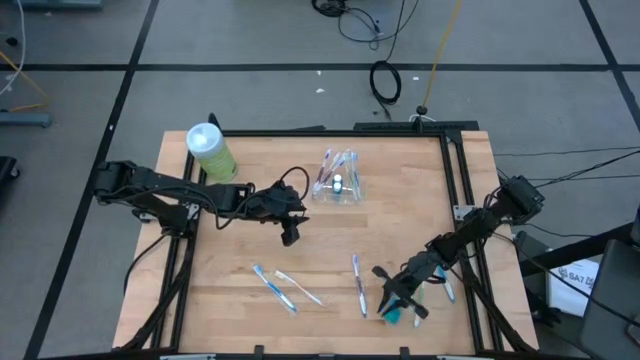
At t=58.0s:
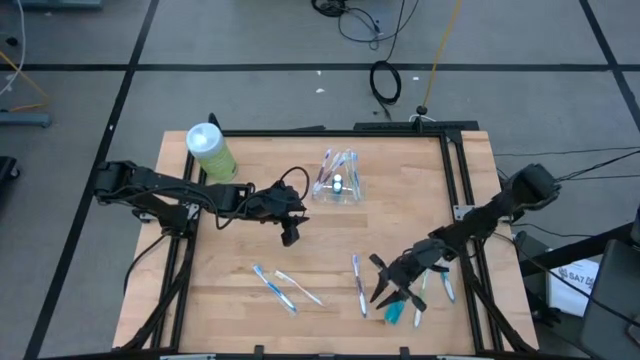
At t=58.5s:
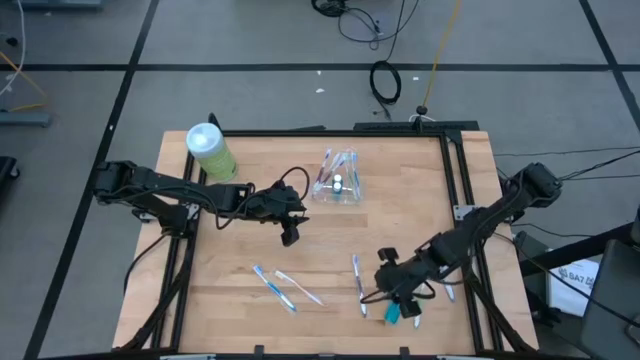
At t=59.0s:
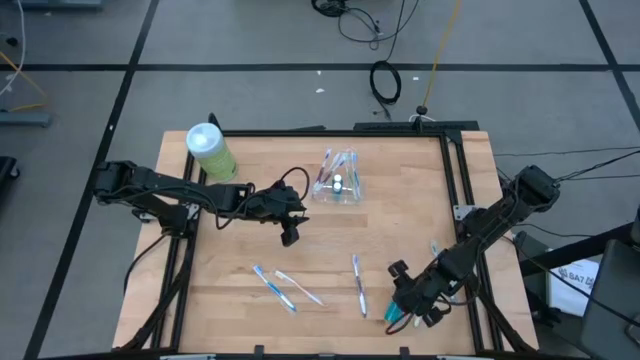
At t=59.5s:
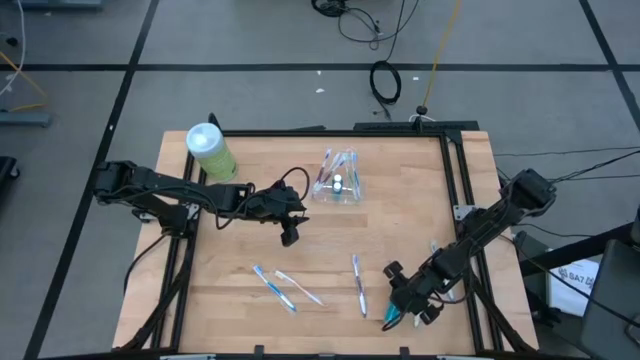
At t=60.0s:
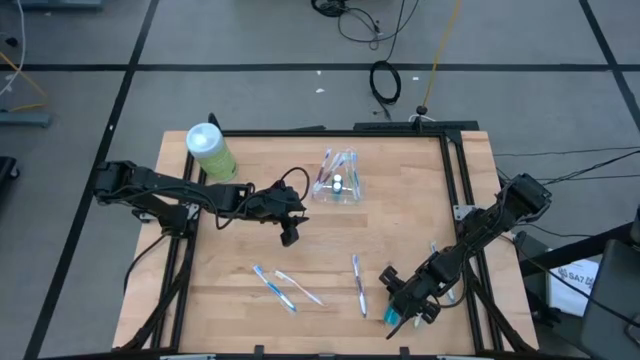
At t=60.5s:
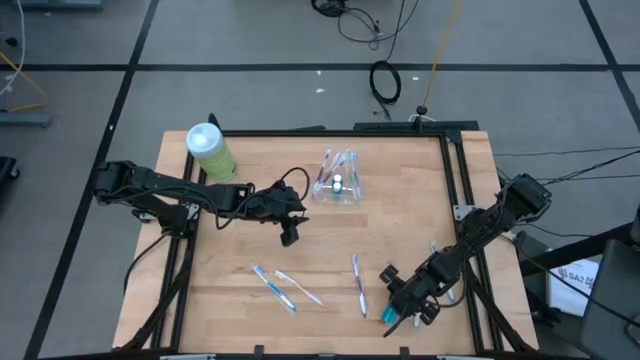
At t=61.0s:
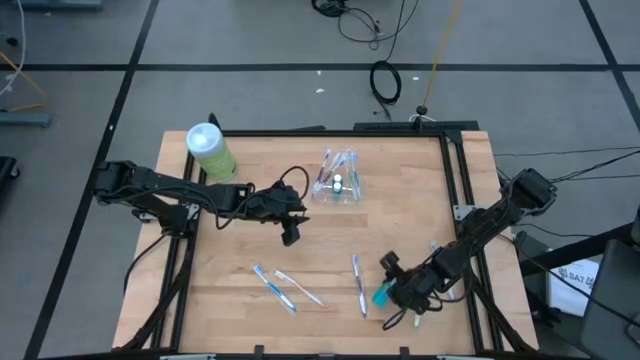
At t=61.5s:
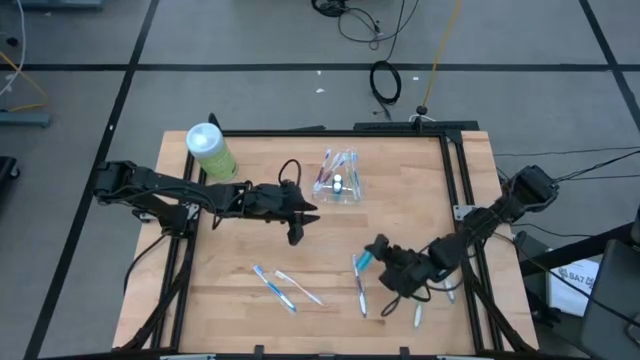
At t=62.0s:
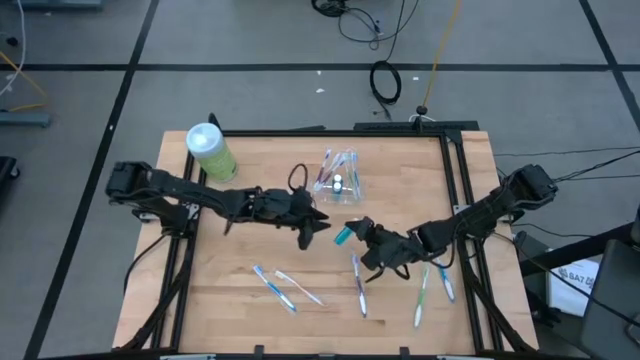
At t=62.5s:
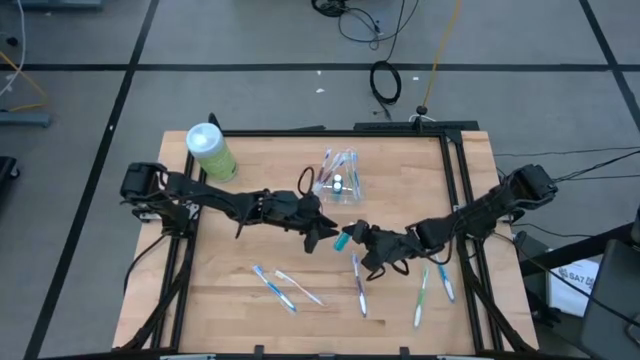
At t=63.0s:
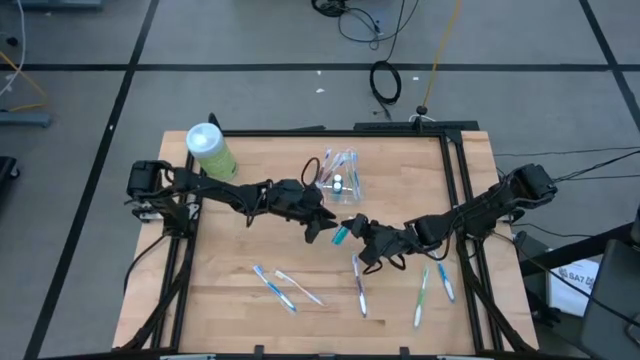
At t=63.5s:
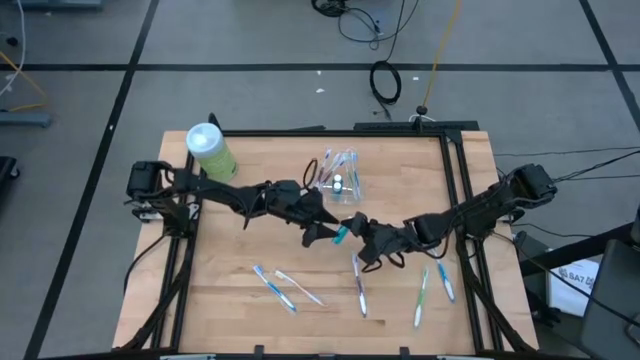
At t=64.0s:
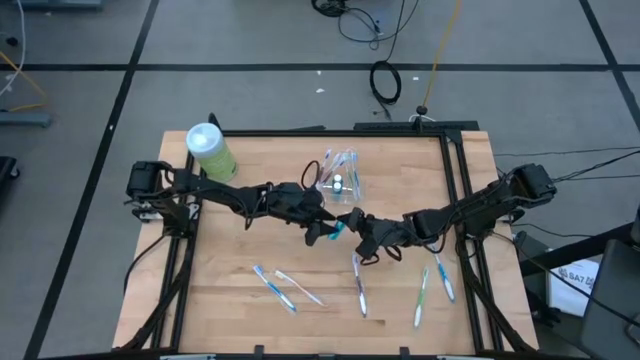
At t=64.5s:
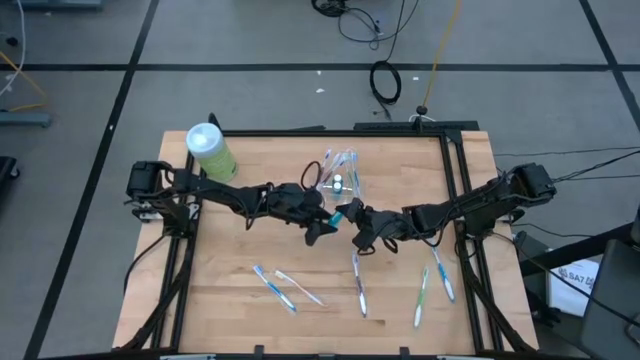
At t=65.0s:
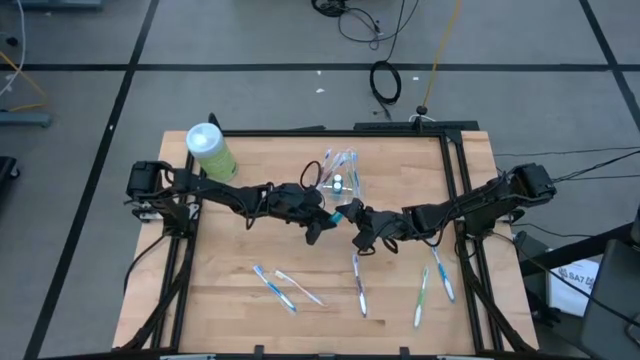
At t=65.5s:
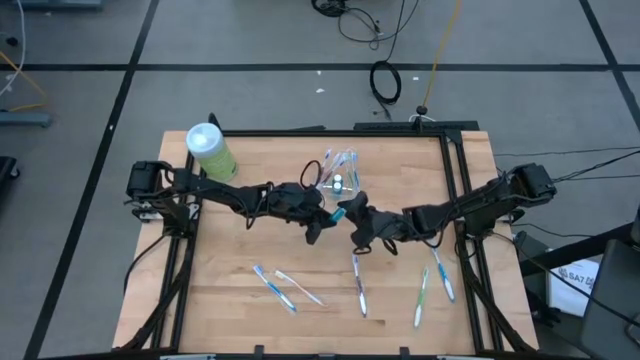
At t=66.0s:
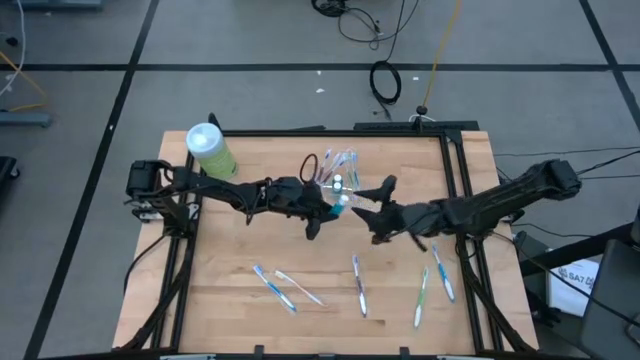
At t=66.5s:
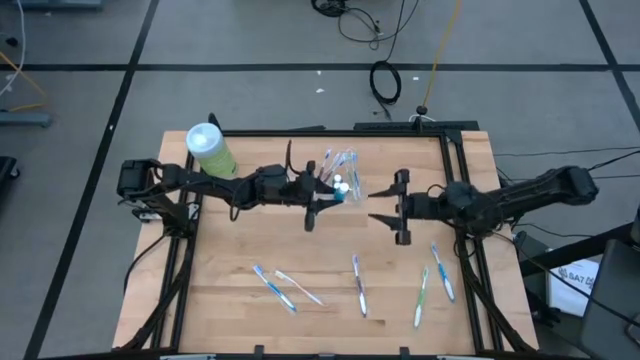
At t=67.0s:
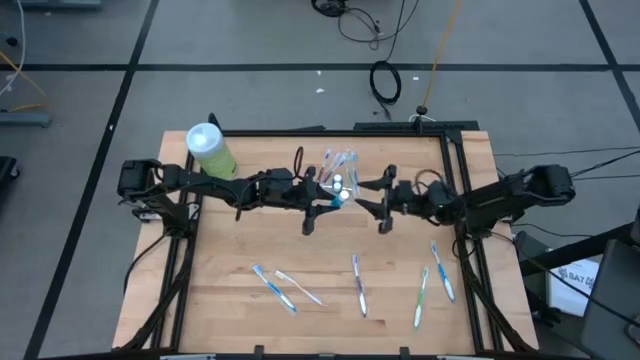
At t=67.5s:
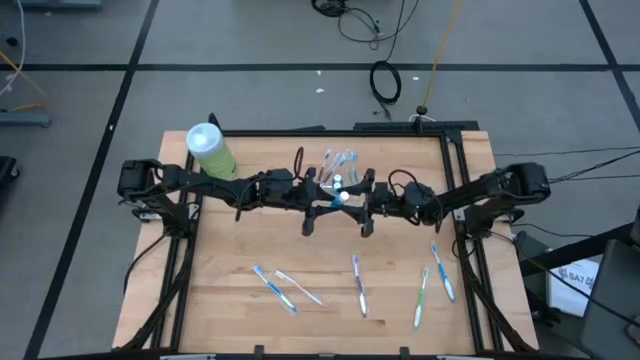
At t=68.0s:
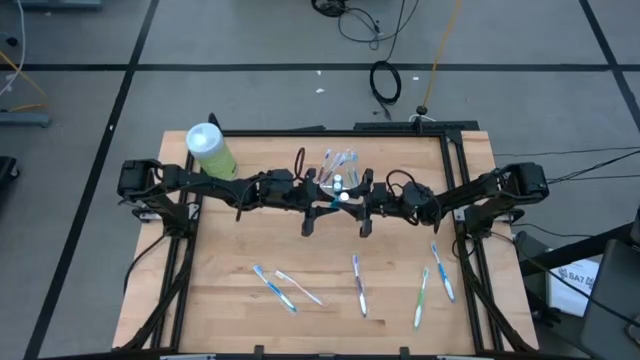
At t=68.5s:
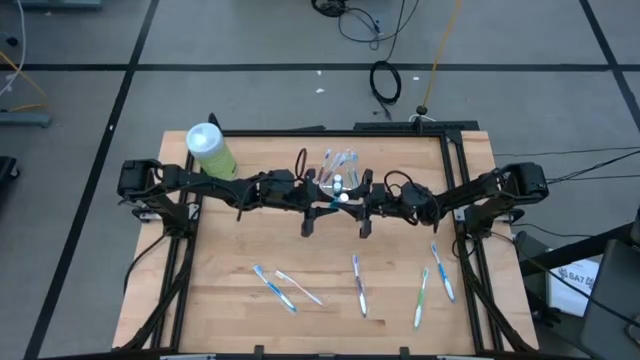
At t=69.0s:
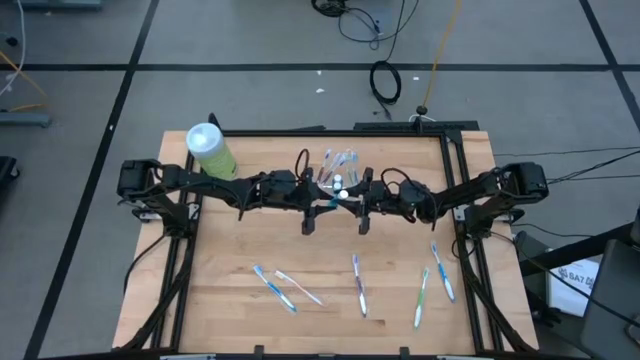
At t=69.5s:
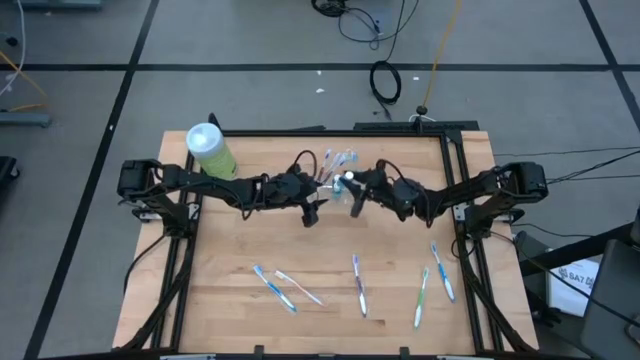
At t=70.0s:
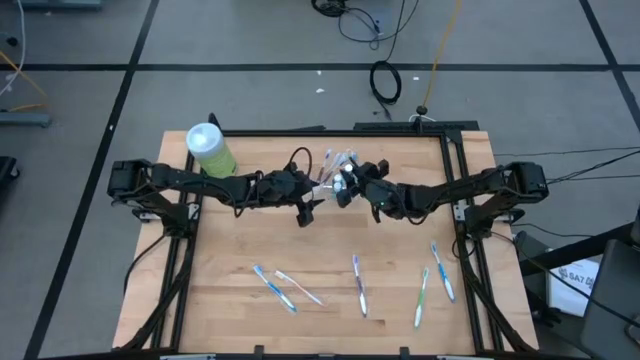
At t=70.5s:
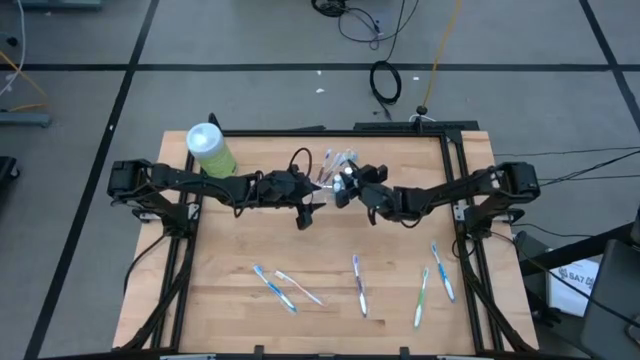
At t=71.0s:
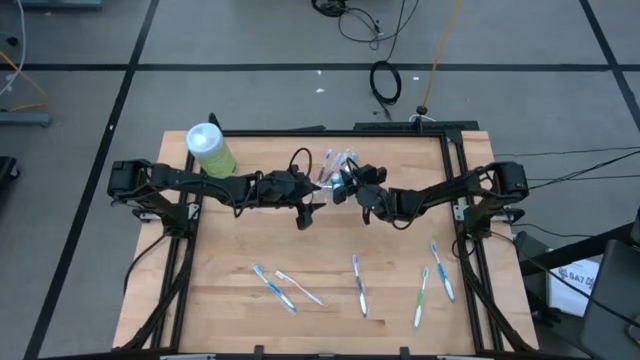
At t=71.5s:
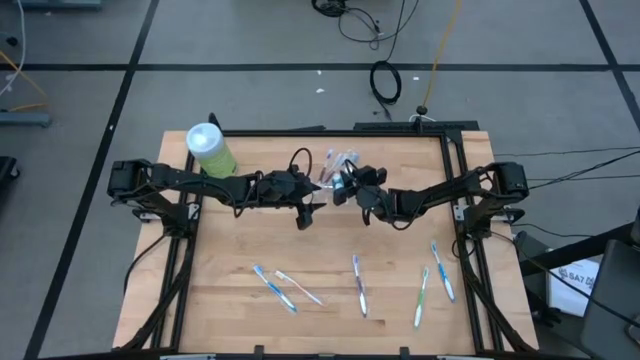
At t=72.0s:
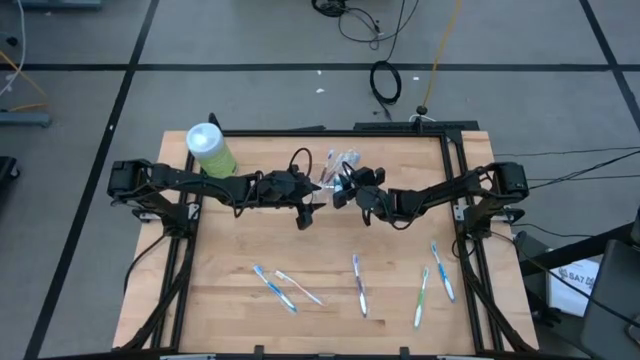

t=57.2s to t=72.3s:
Task: Pick & Place toothbrushing station
Put the blue mouthwash into the transparent organizer

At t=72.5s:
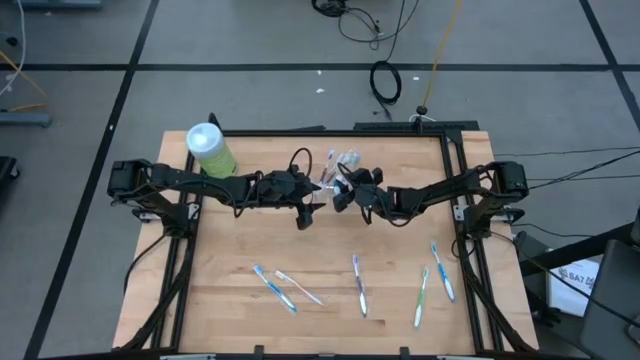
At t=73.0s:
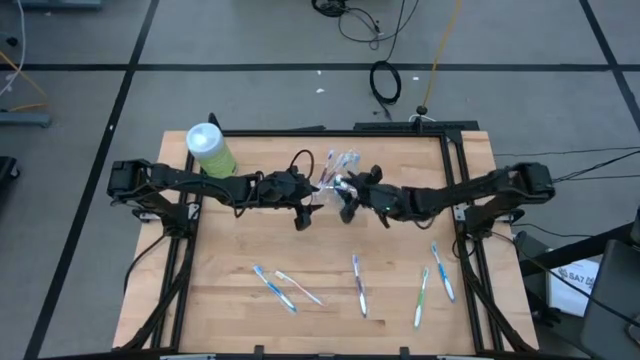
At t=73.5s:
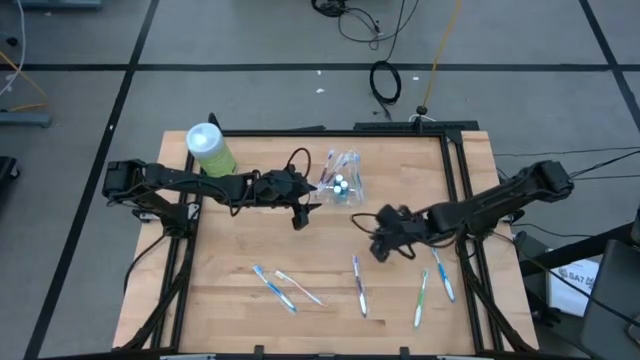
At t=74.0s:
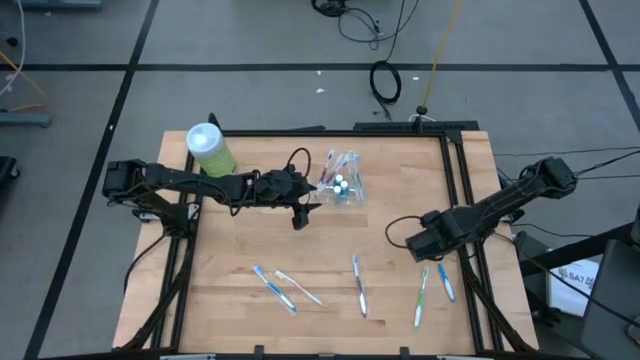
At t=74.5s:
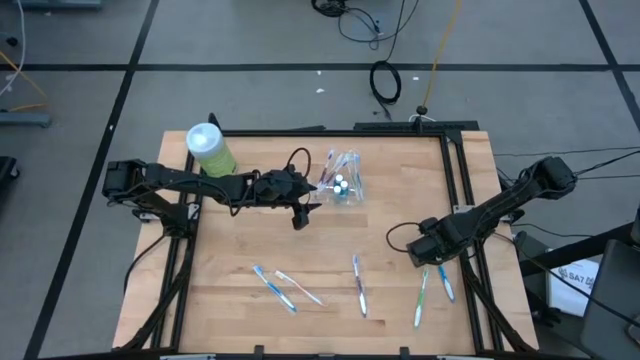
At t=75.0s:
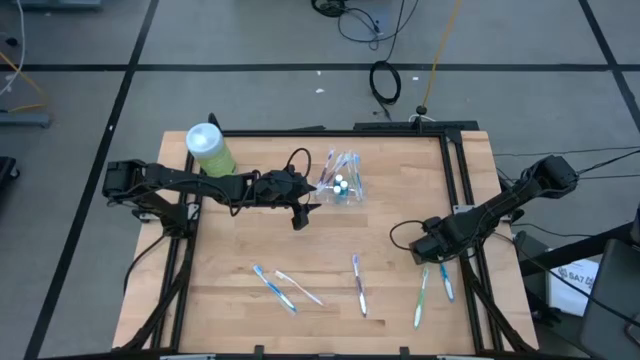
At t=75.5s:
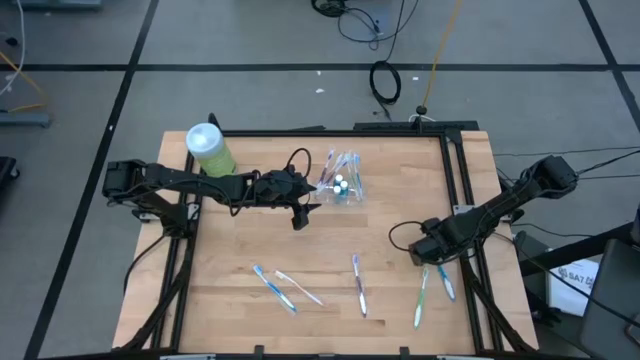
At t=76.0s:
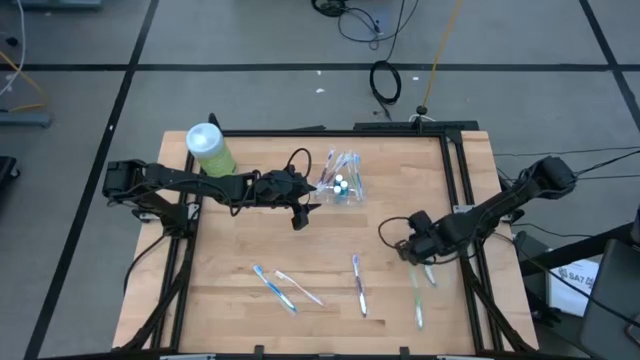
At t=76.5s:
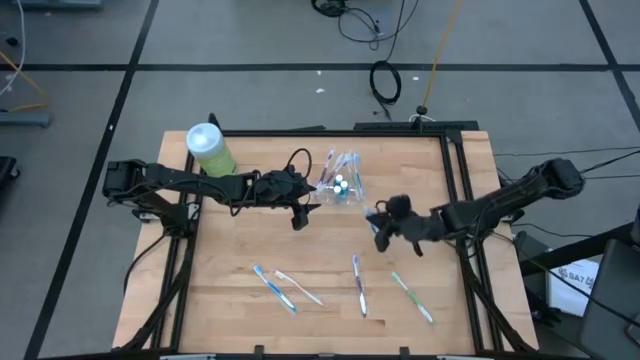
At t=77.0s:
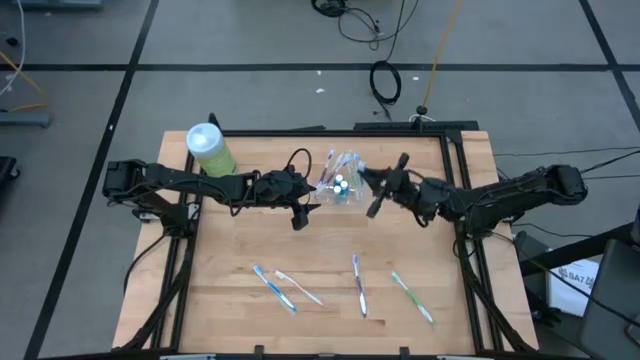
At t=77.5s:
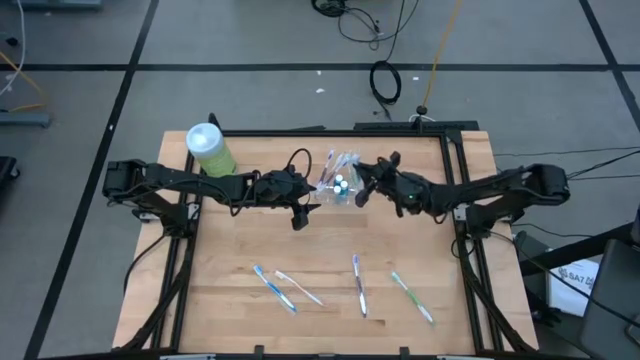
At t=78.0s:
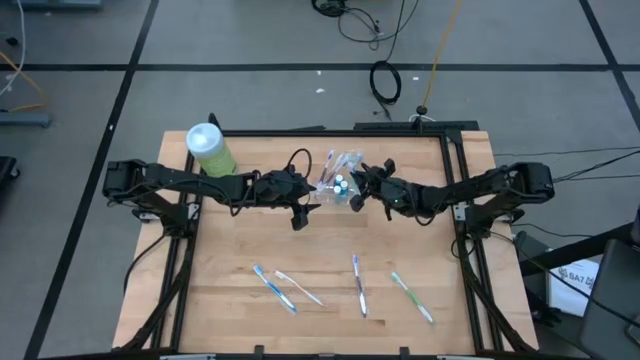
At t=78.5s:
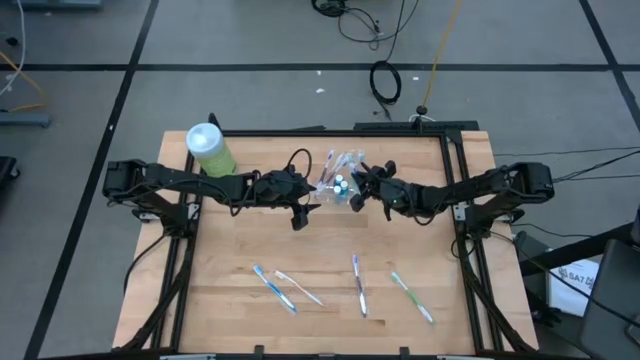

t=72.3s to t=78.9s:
Put the right blue toothbrush into the transparent organizer
